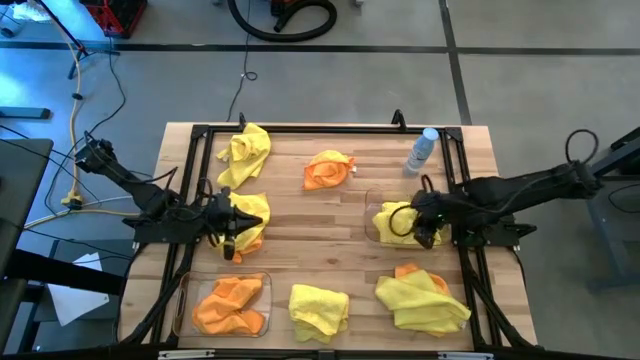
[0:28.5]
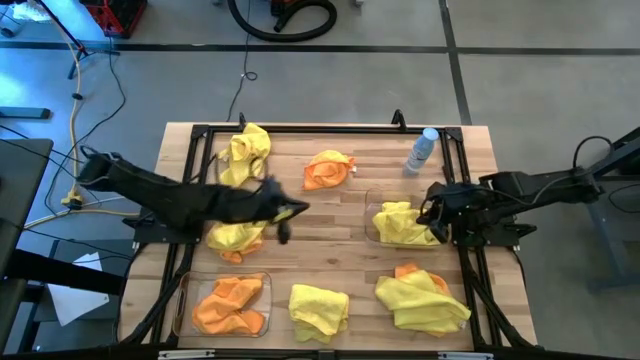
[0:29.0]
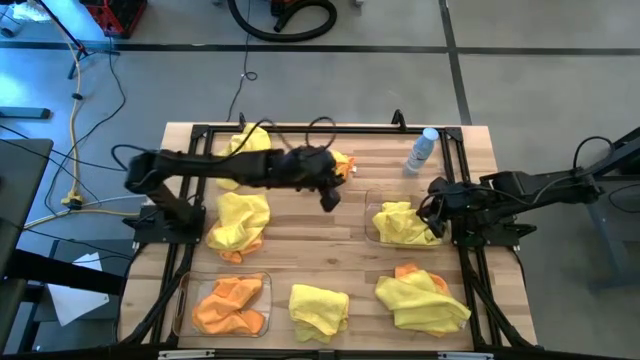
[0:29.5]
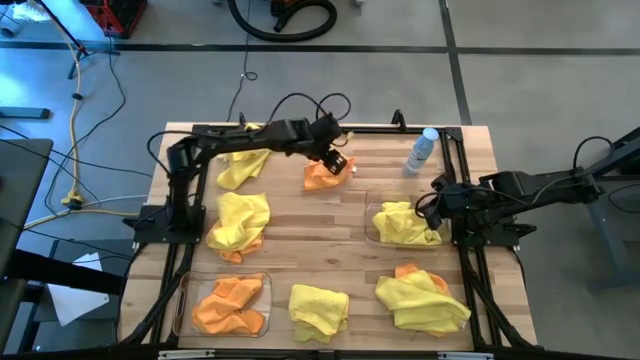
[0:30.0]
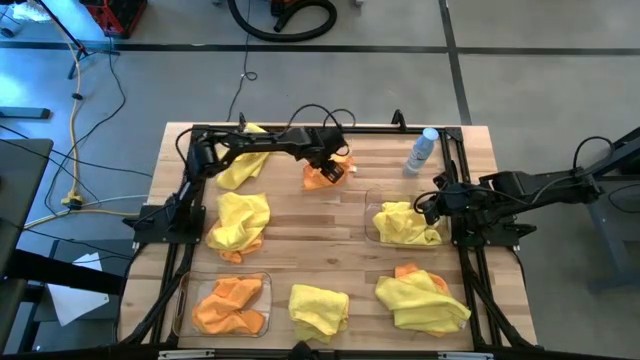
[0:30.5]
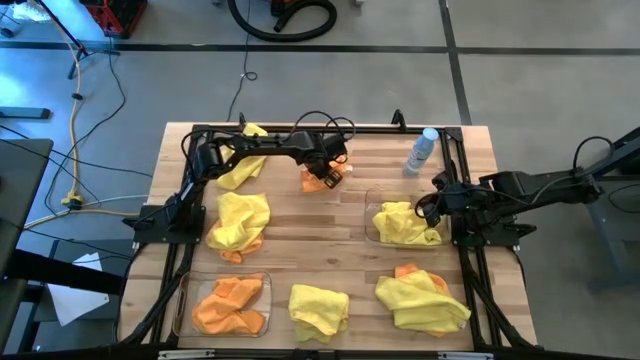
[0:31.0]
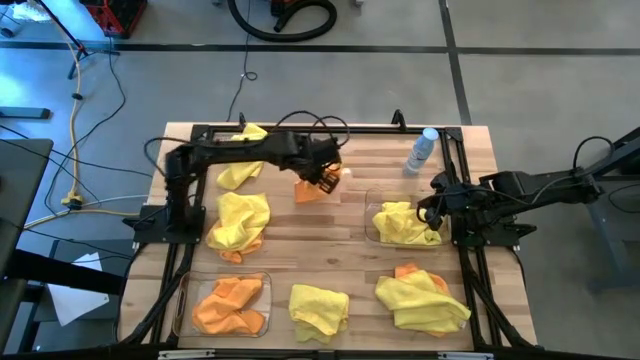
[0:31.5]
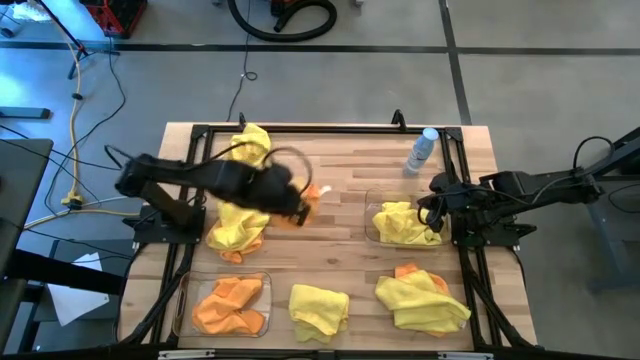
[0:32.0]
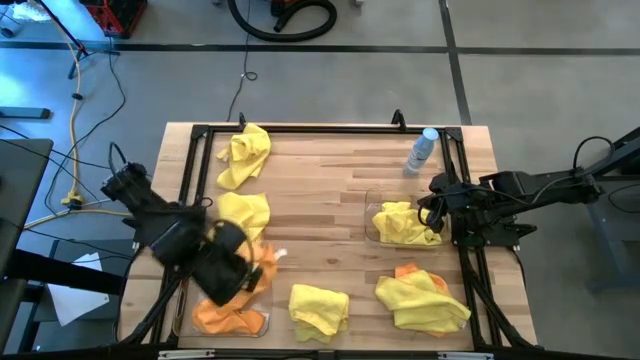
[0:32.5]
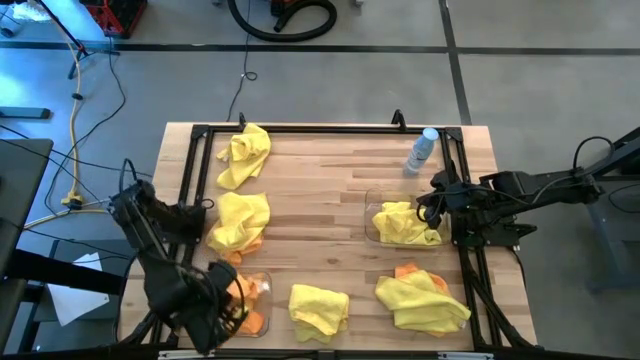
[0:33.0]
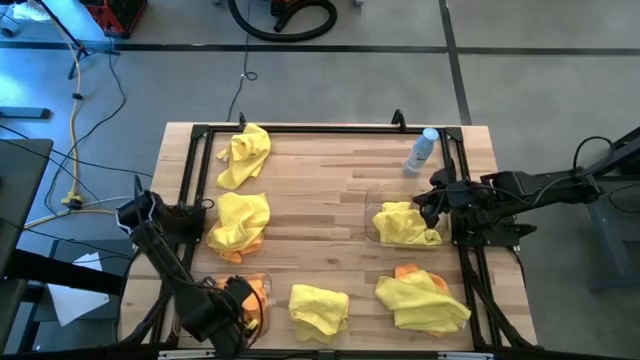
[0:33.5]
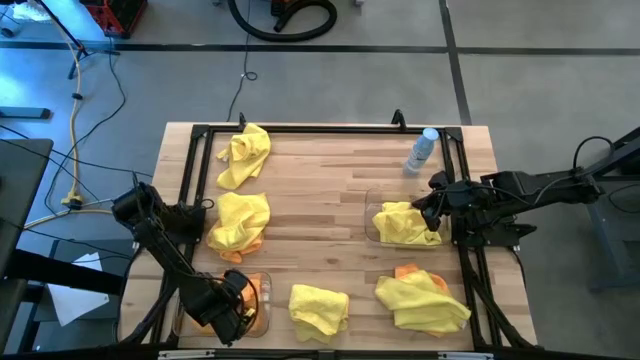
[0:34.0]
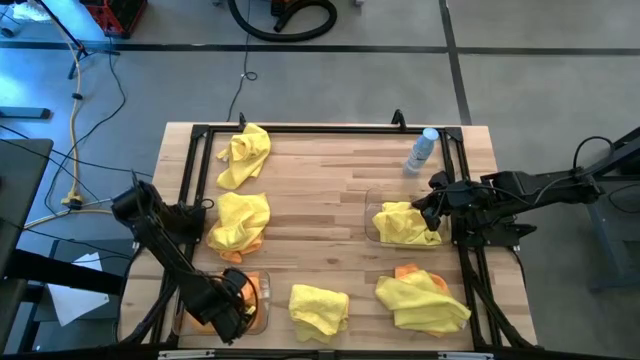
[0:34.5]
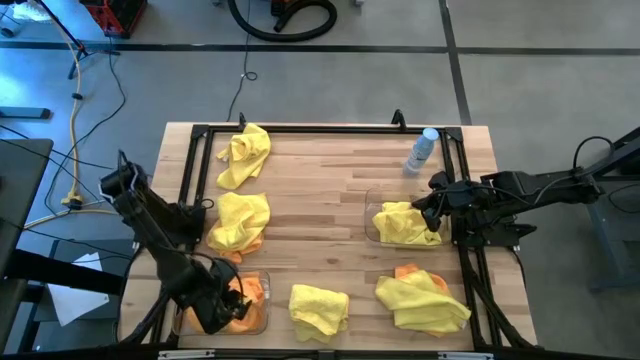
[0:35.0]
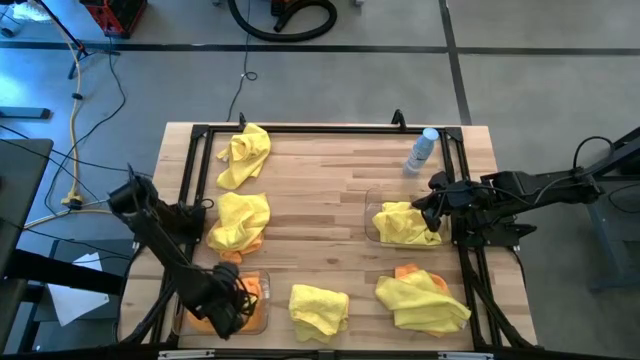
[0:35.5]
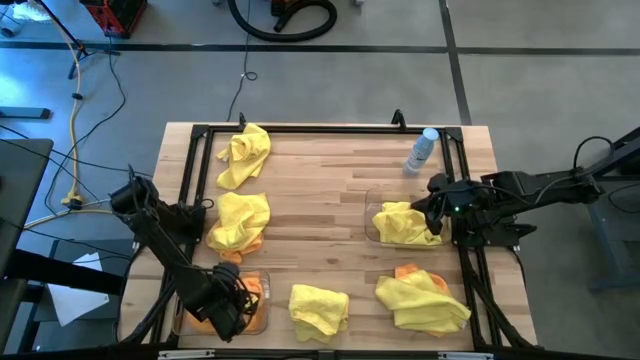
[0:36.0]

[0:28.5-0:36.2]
Task: Sort microfiber towel by color & place in baskets
Put the orange microfiber cloth into the left transparent bin

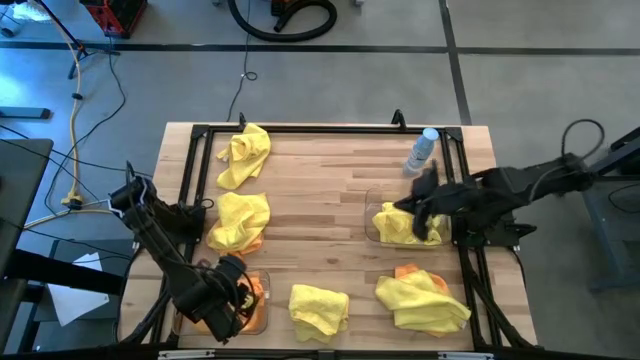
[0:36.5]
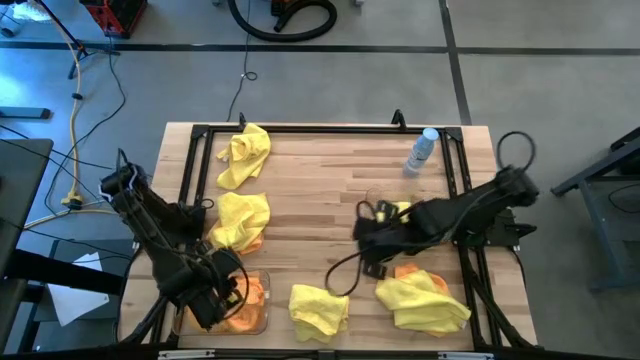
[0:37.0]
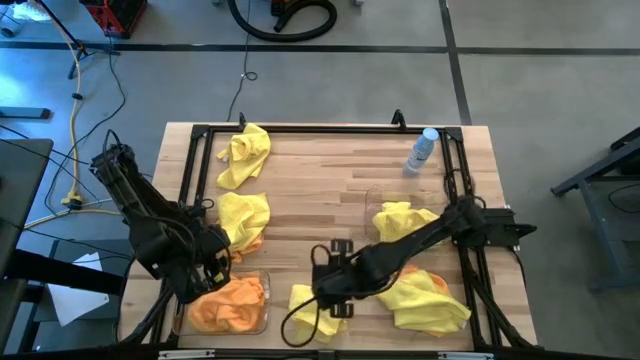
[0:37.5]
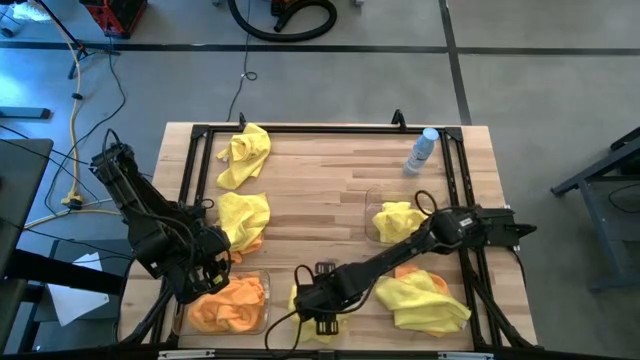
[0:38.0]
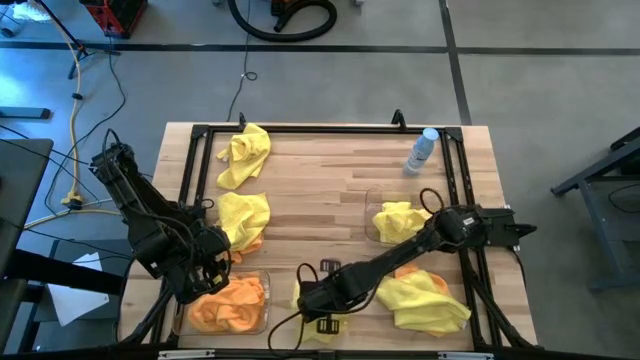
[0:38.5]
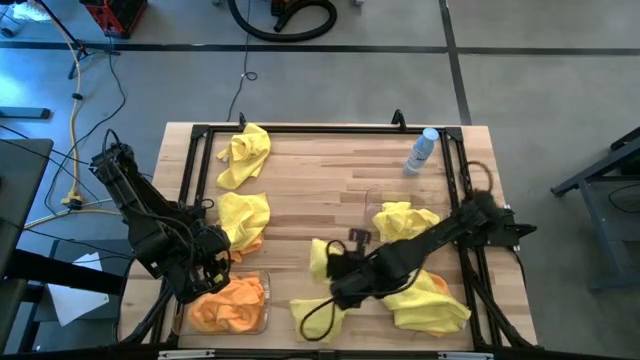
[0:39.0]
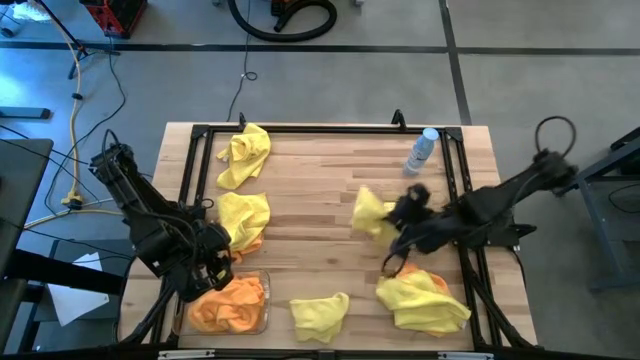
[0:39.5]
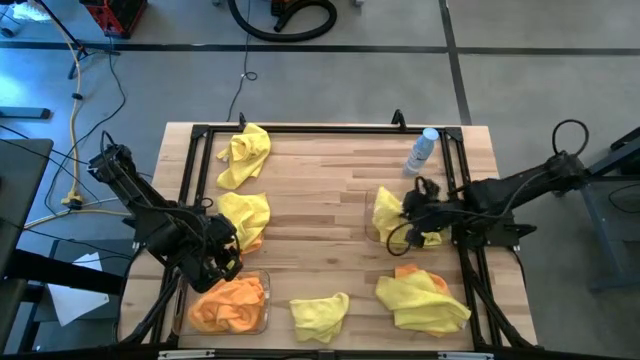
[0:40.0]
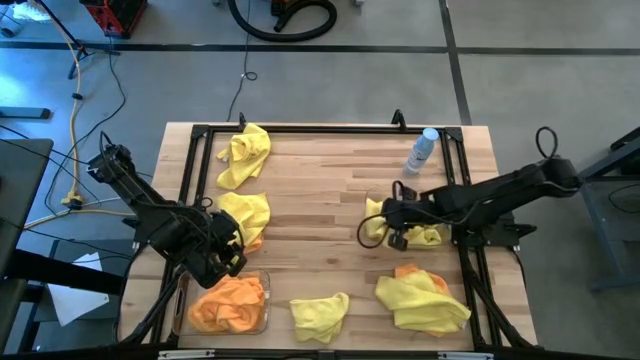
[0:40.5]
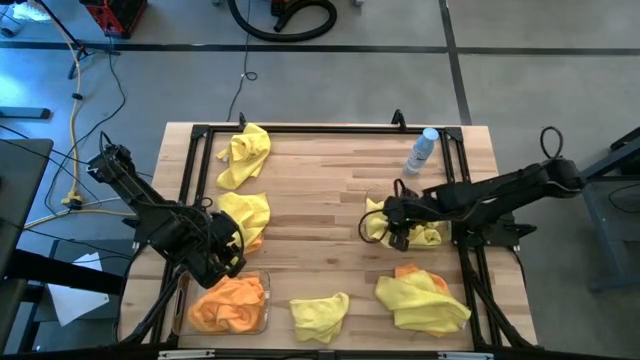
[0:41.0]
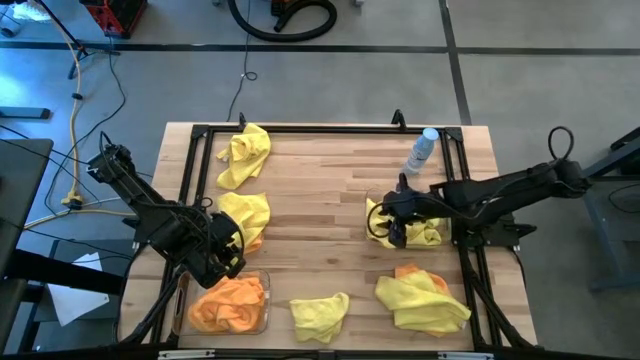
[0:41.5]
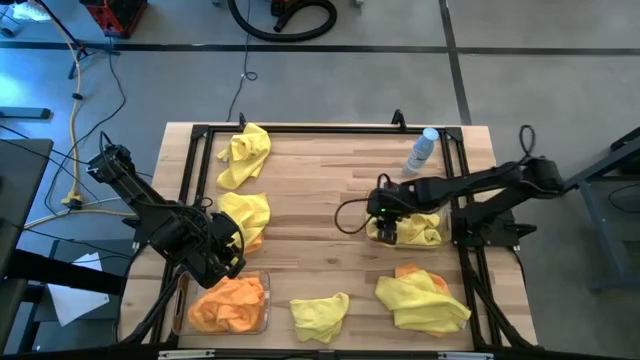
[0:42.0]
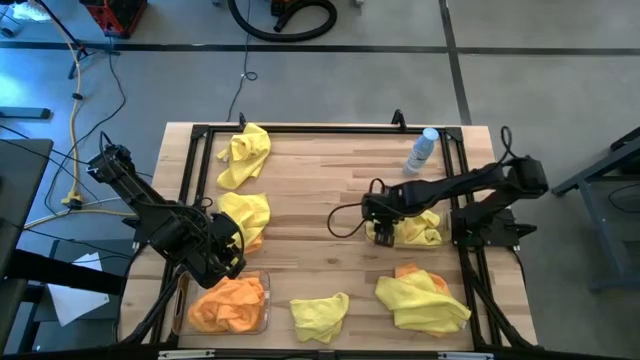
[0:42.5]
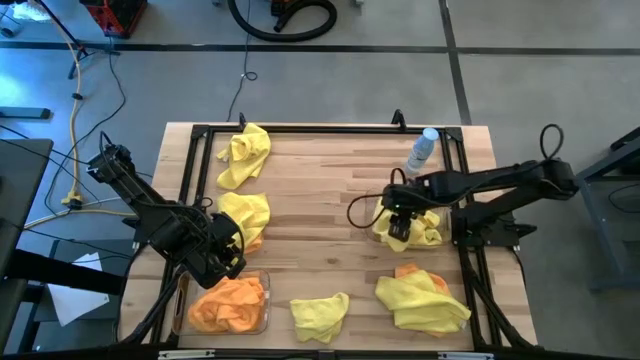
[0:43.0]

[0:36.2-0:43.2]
Put the yellow microfiber cloth into the right transparent bin

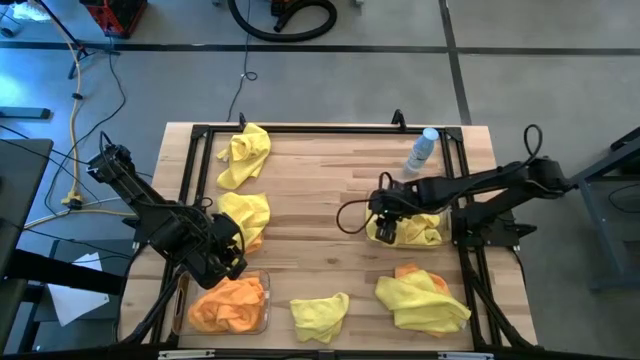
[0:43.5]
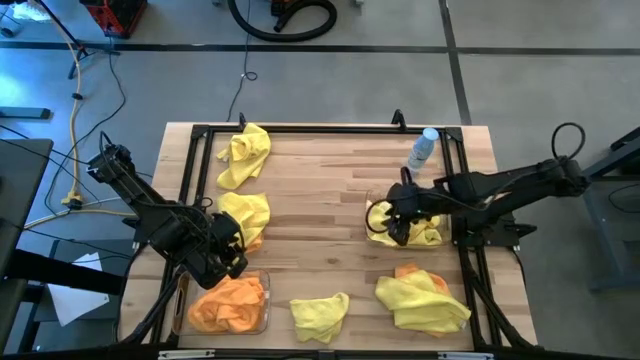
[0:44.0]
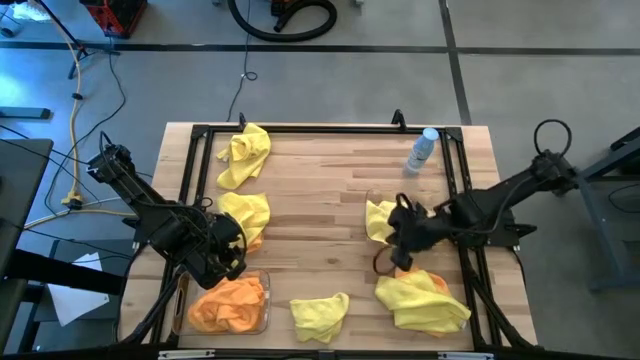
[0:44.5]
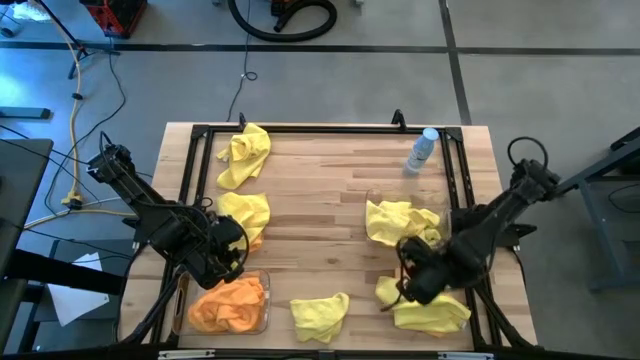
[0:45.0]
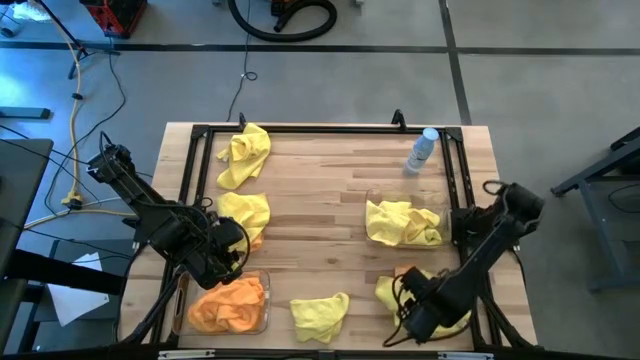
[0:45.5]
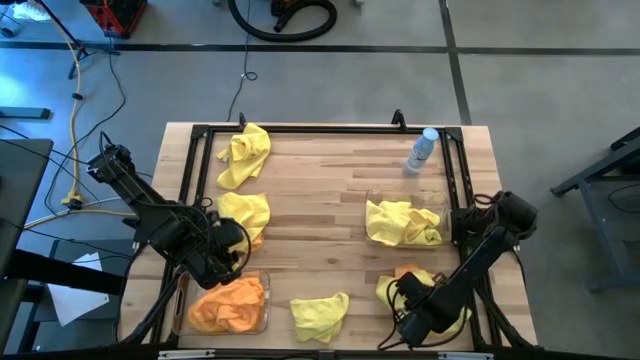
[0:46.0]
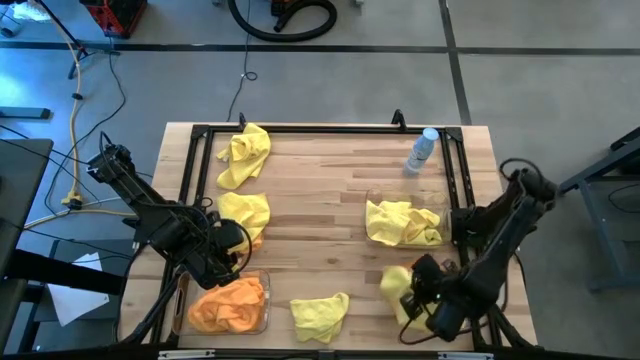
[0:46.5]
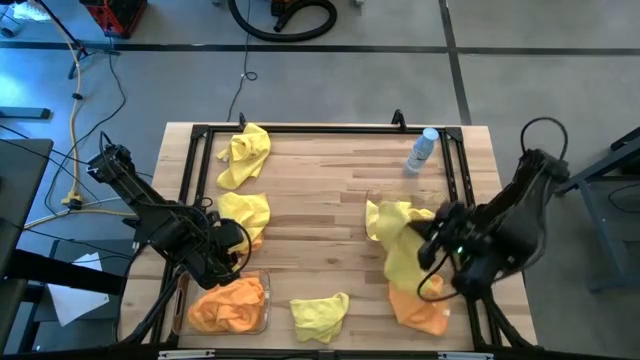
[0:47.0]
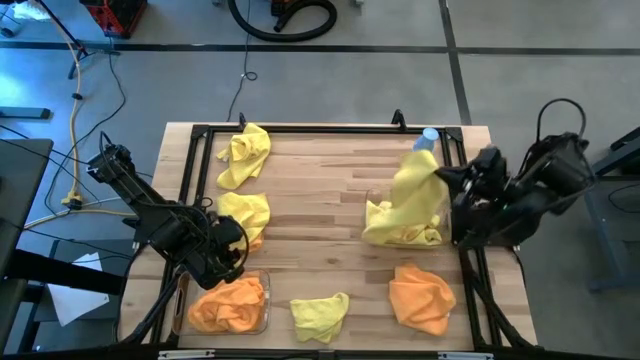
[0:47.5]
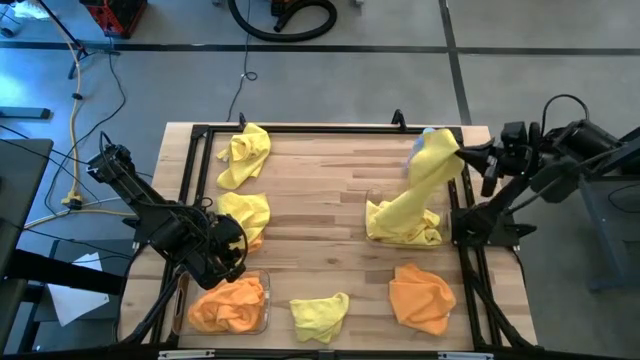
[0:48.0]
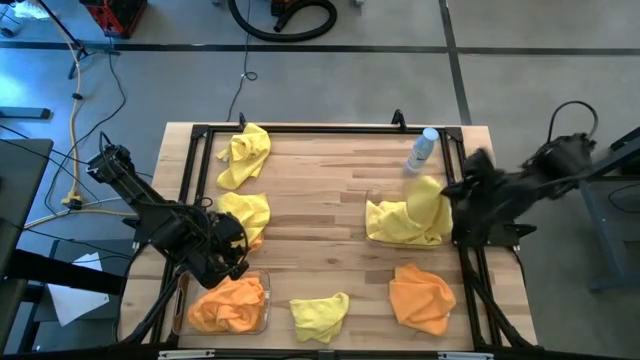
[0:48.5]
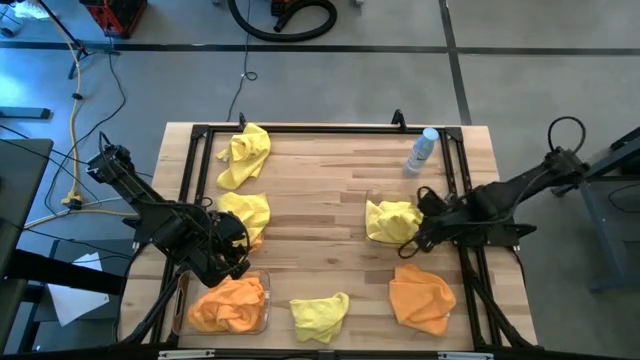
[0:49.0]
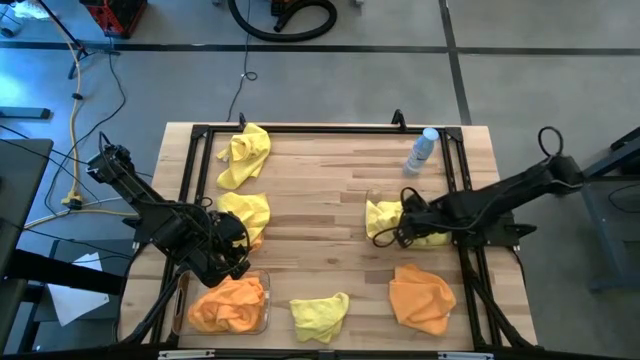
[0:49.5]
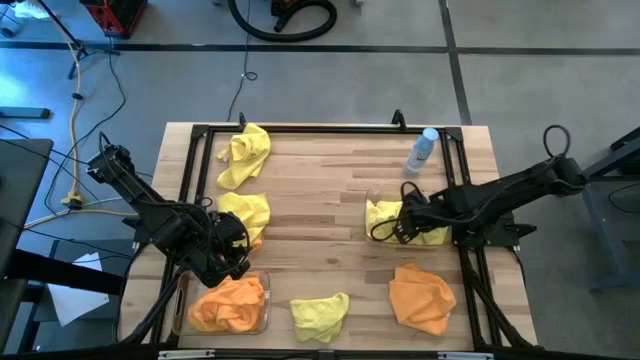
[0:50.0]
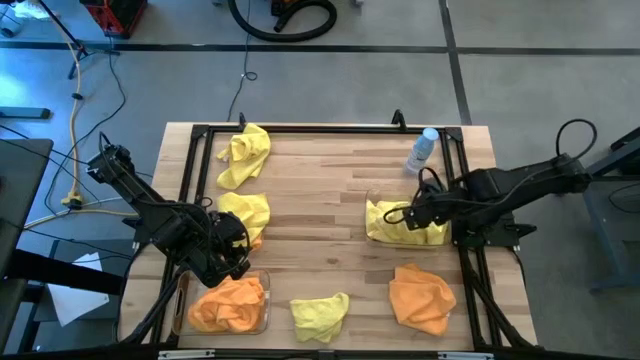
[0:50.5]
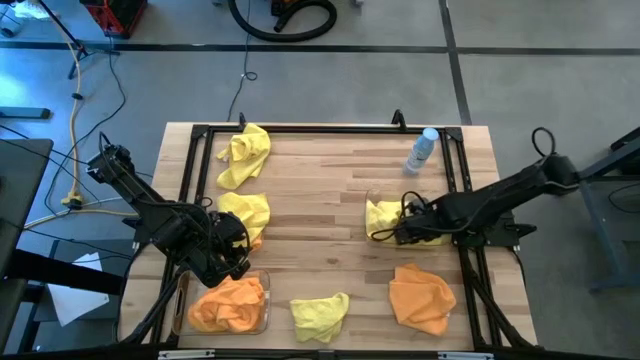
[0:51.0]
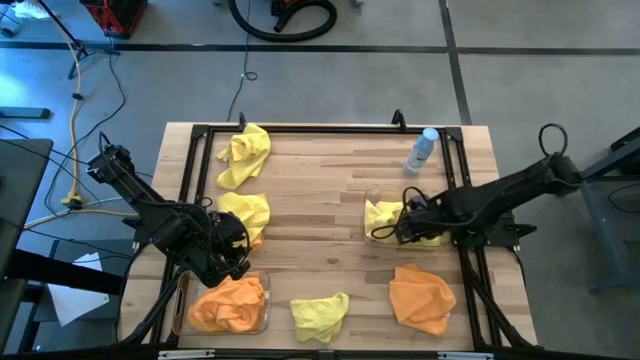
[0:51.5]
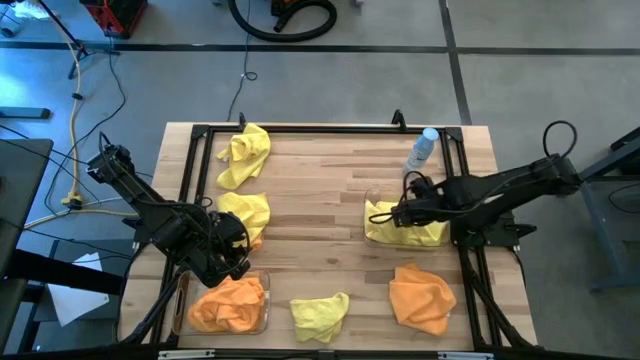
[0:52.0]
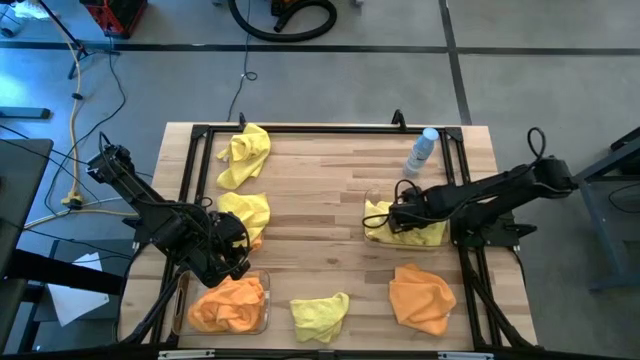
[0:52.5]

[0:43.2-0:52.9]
Put the yellow microfiber cloth into the right transparent bin
